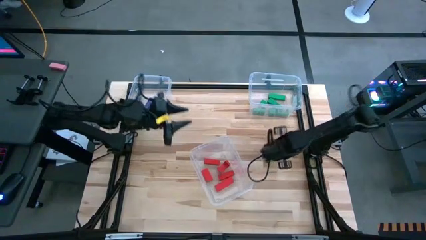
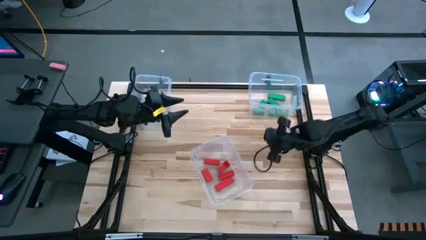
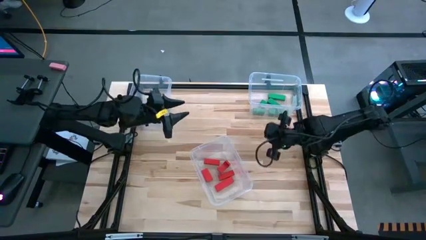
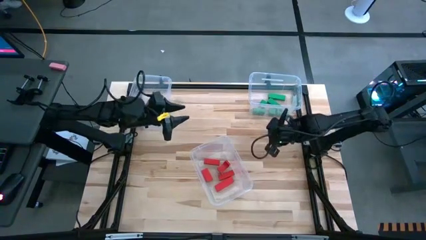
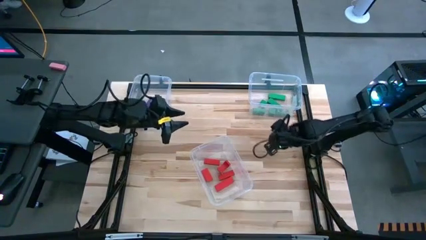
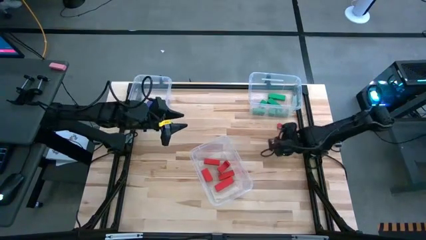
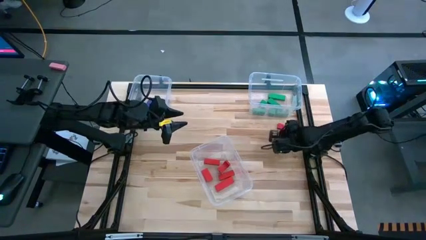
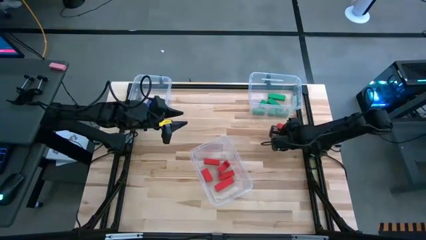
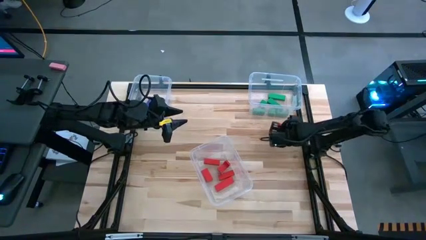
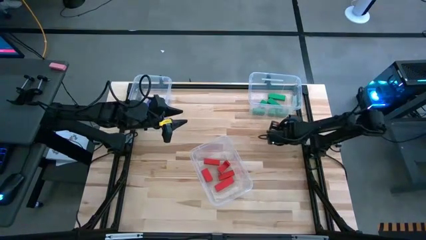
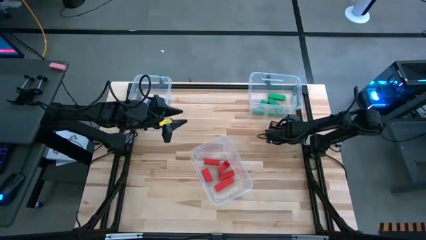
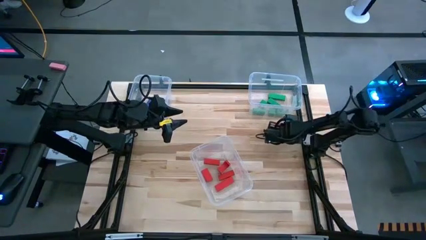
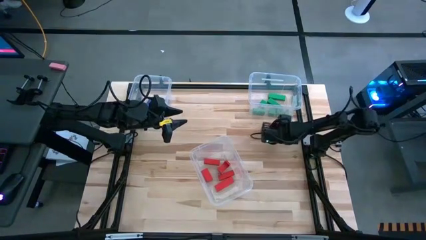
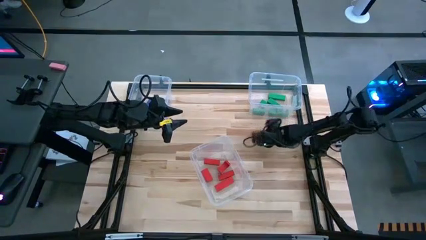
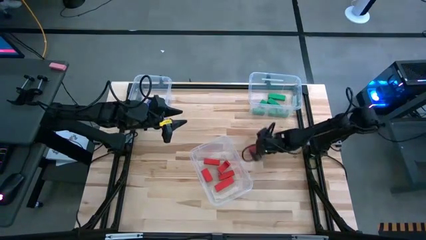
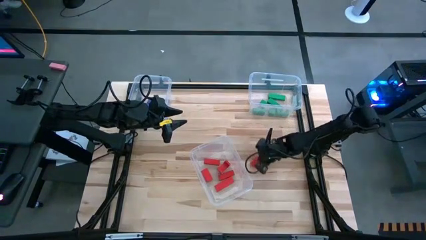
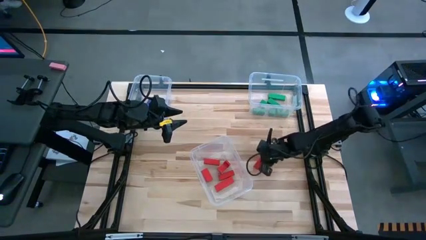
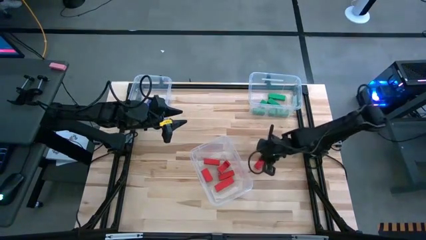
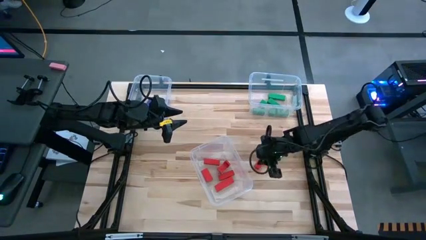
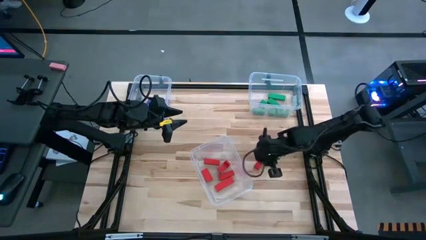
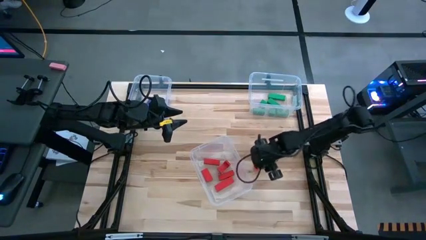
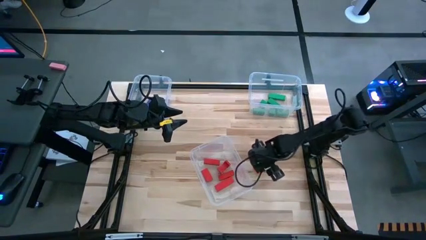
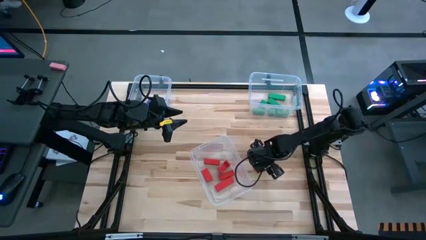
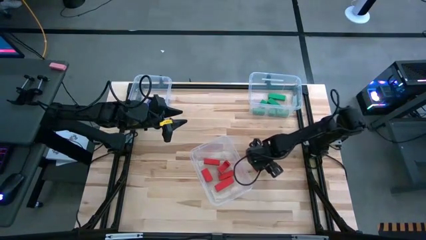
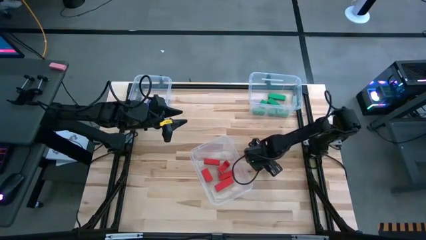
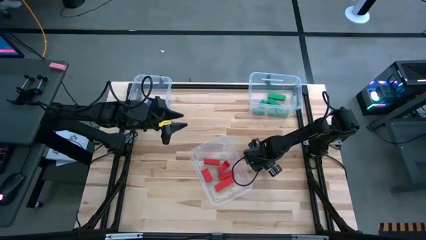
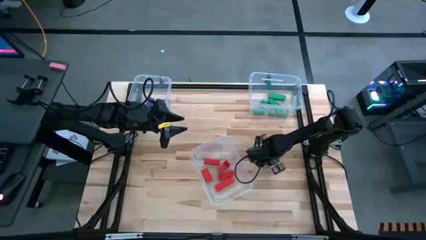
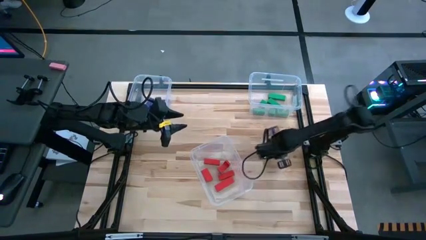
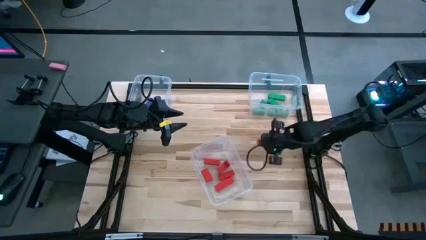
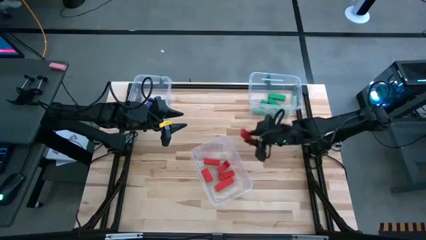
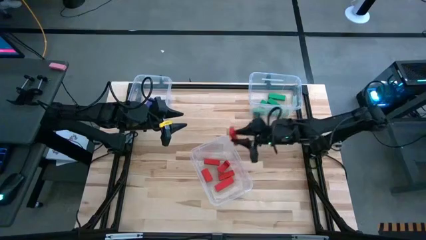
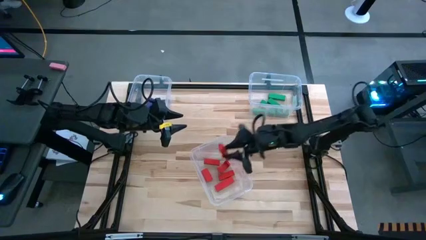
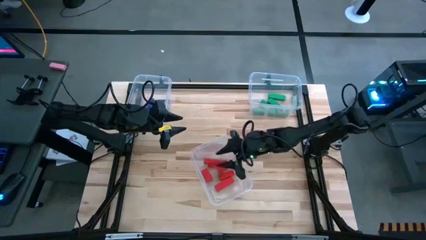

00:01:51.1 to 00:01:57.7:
Task: Sort blocks
Put the red block into the bottom transparent bin

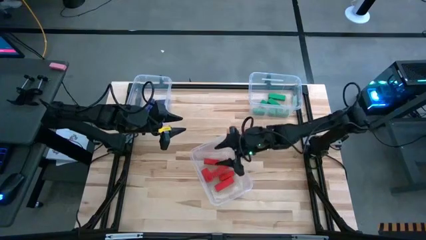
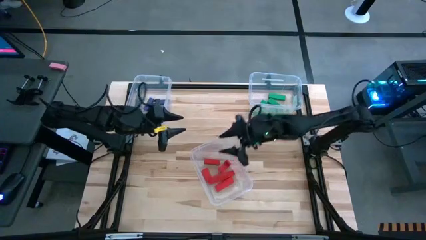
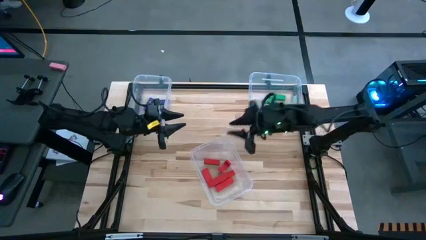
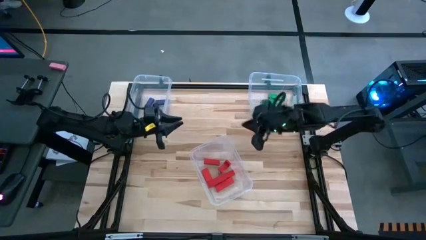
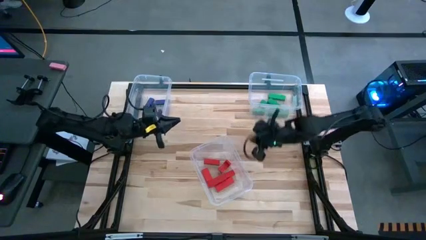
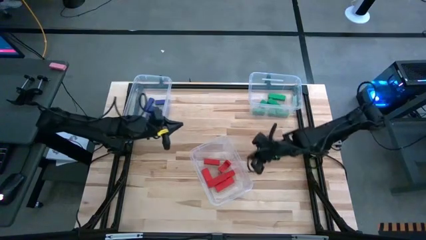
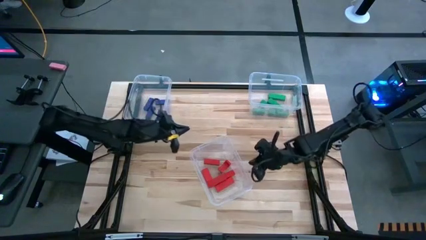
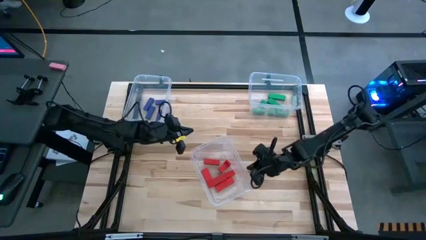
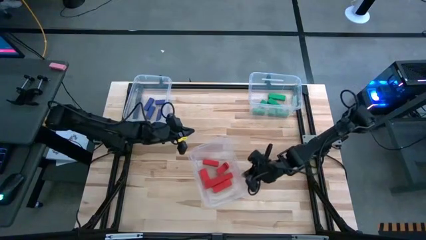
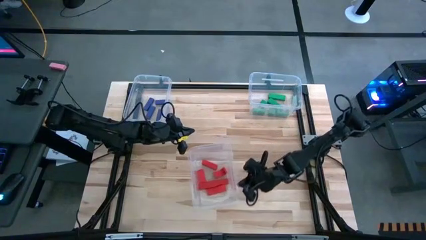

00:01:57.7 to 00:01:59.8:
Adjust the bottom transparent bin

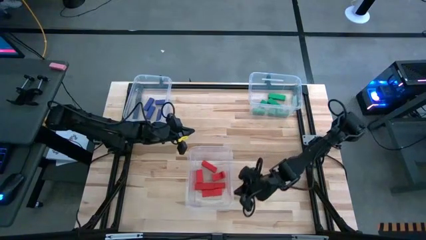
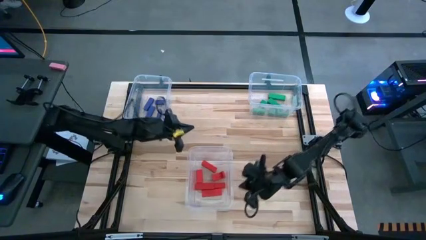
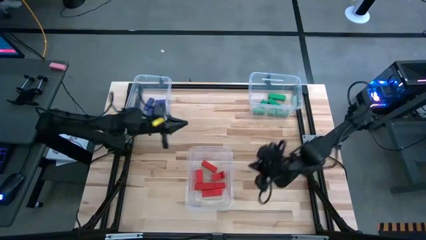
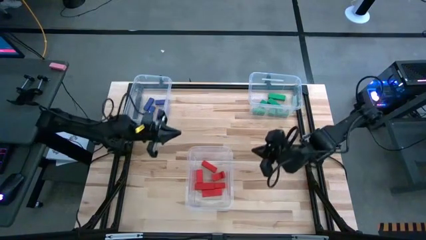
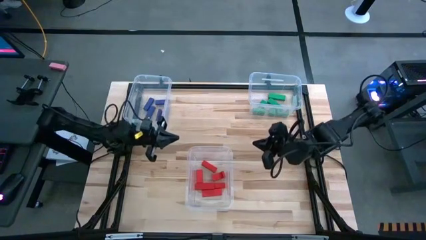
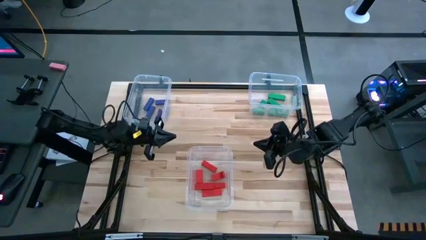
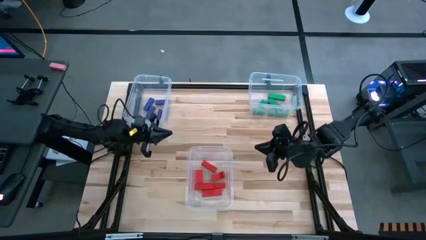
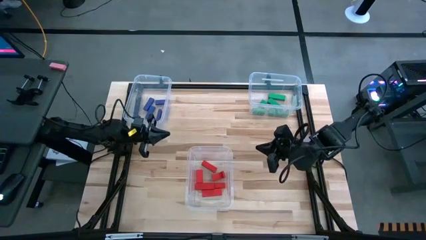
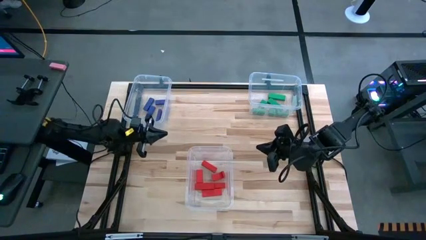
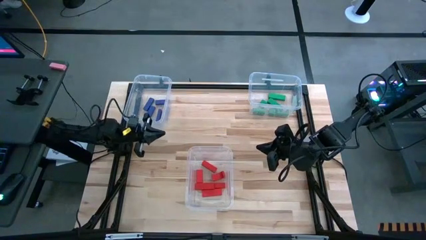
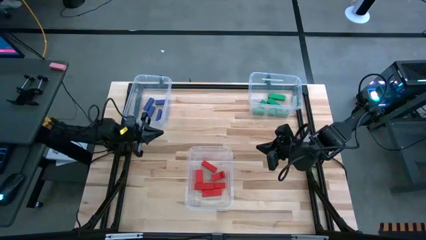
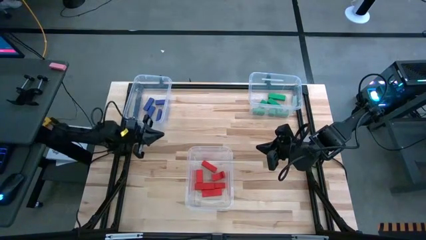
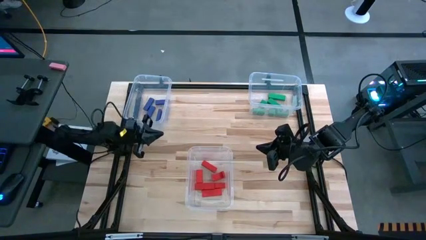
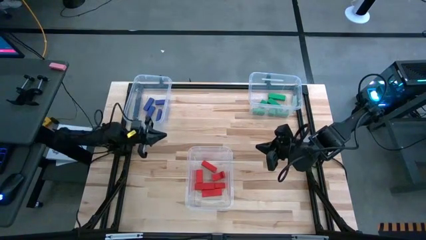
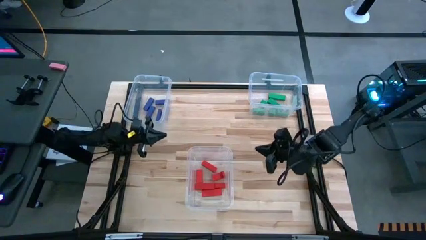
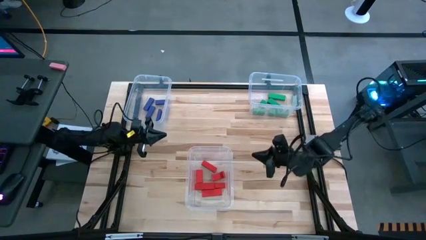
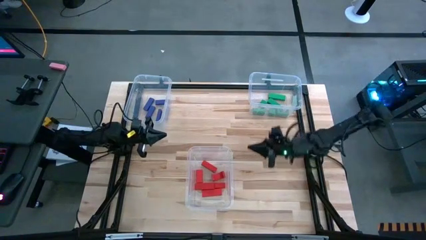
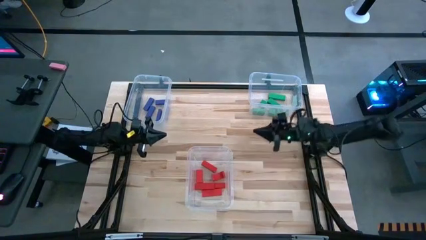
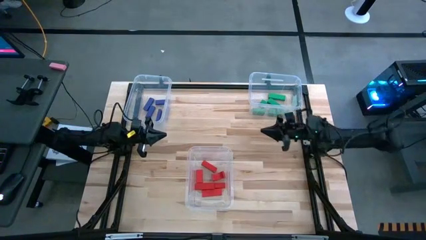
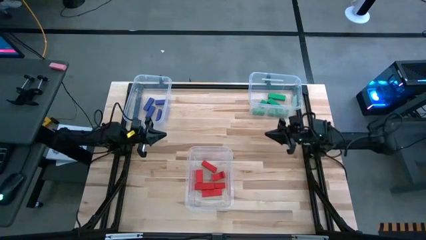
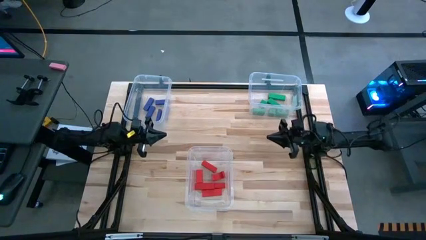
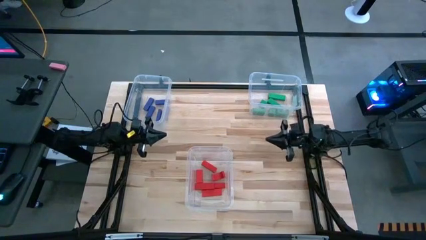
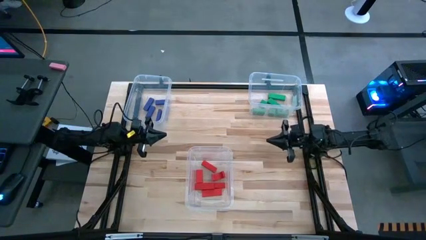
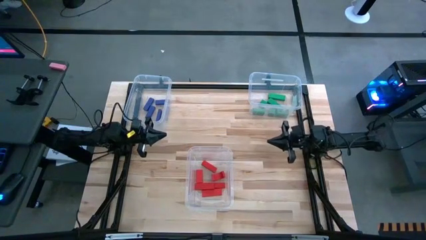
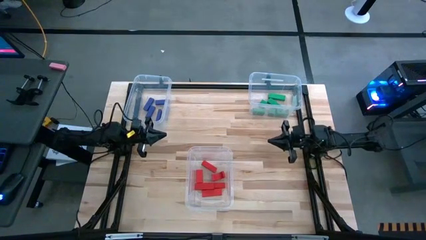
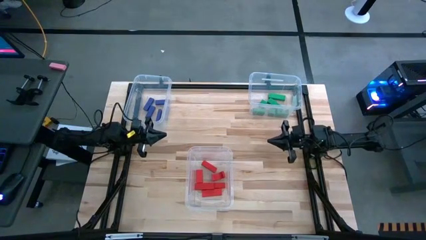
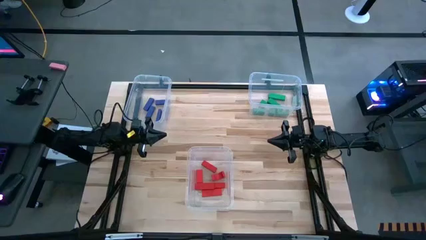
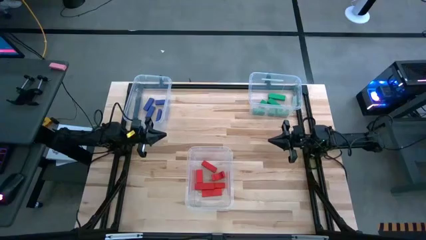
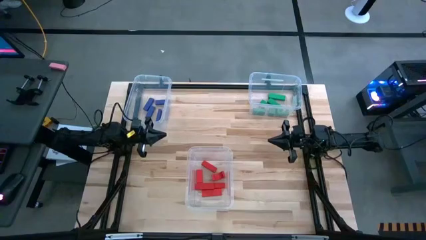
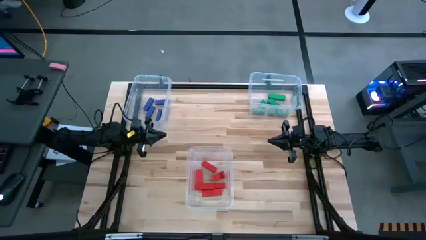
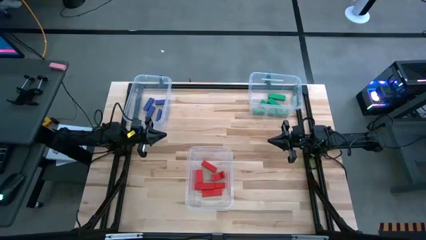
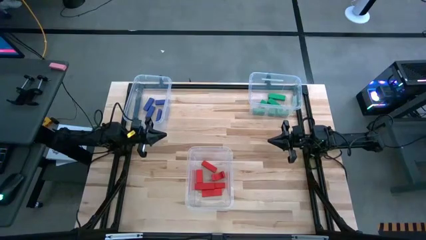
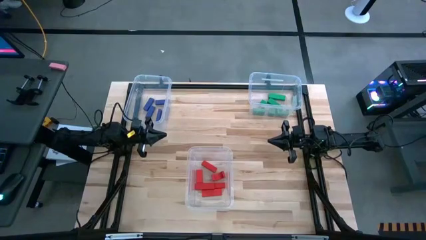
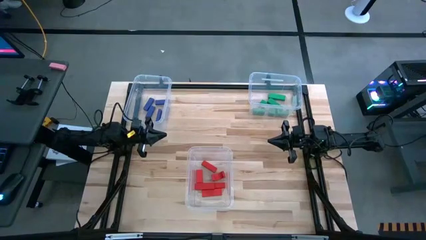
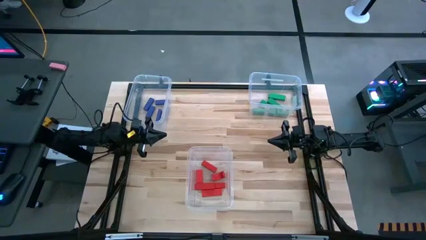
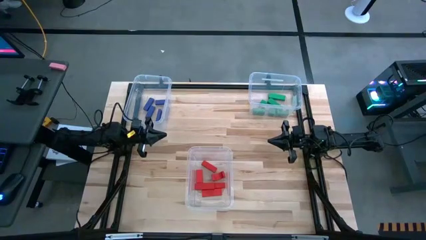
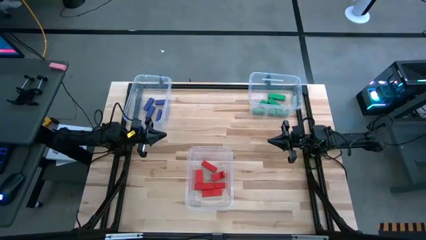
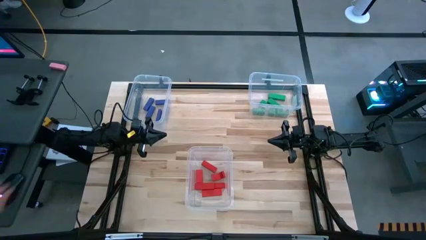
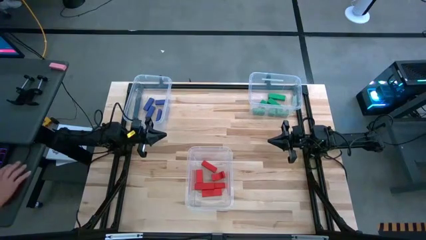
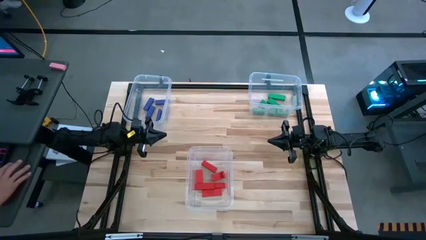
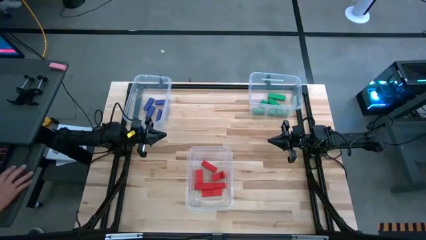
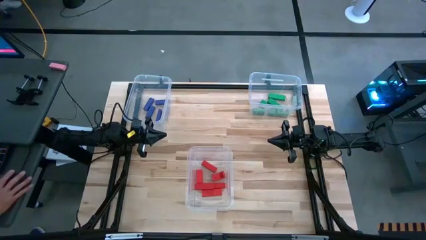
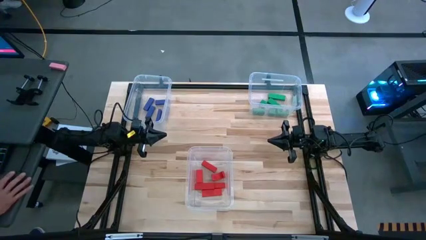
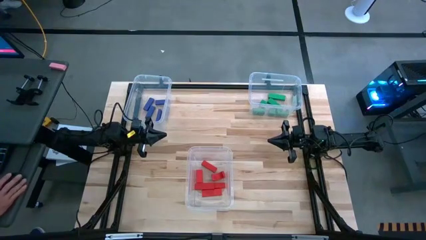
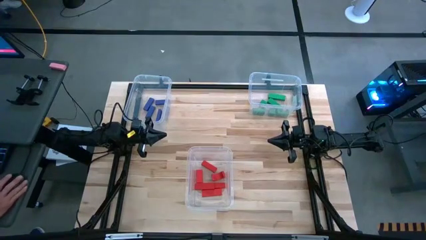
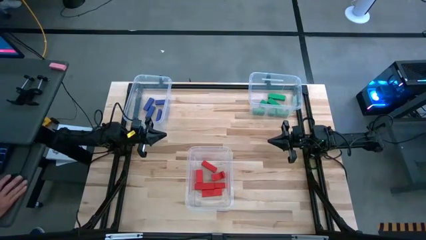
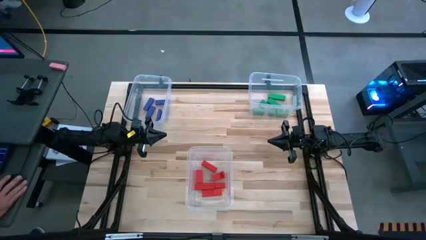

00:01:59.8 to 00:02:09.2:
Return to Home Position
